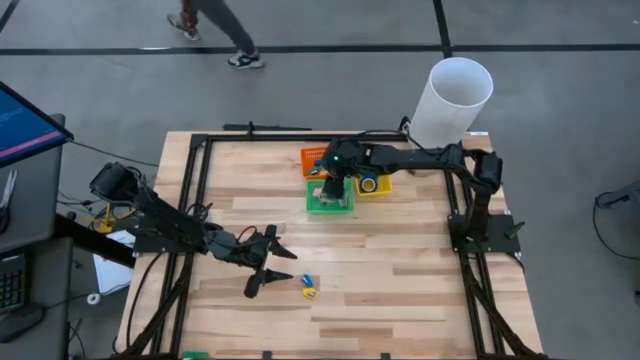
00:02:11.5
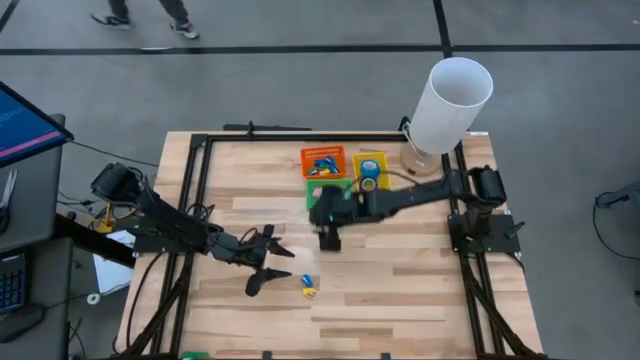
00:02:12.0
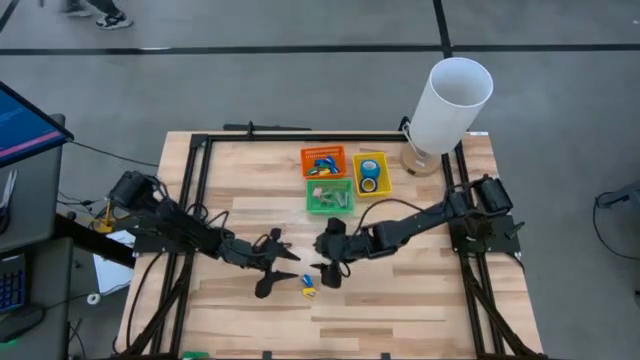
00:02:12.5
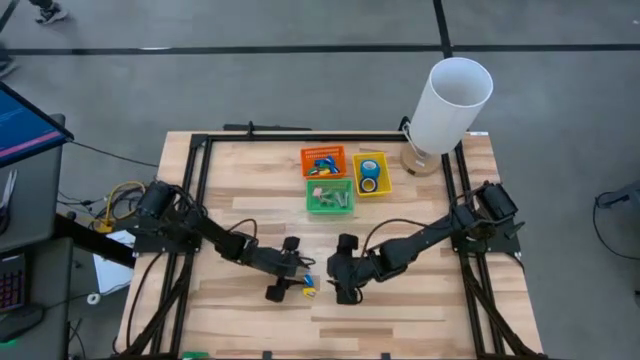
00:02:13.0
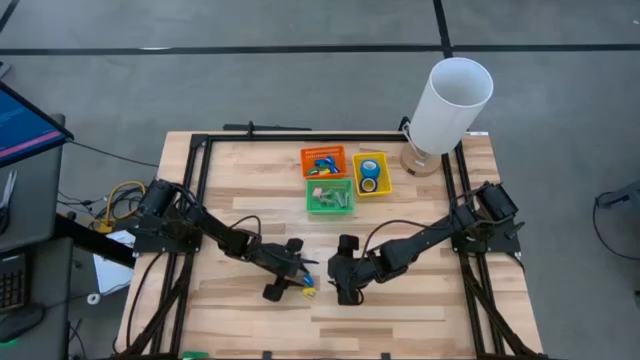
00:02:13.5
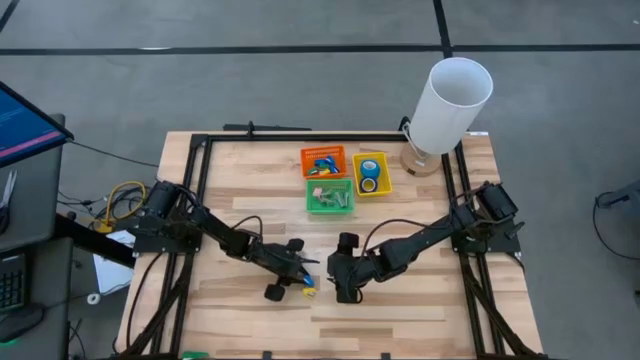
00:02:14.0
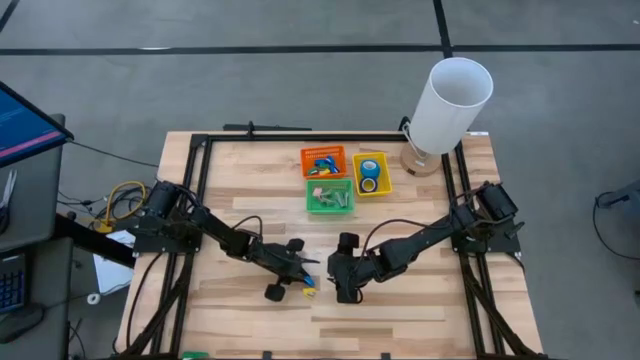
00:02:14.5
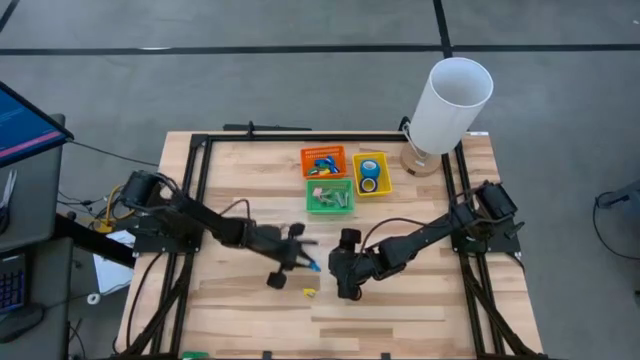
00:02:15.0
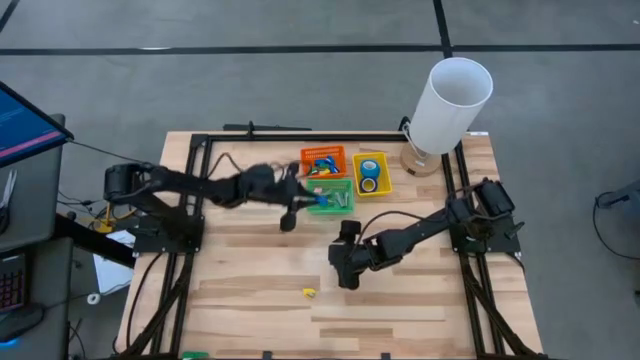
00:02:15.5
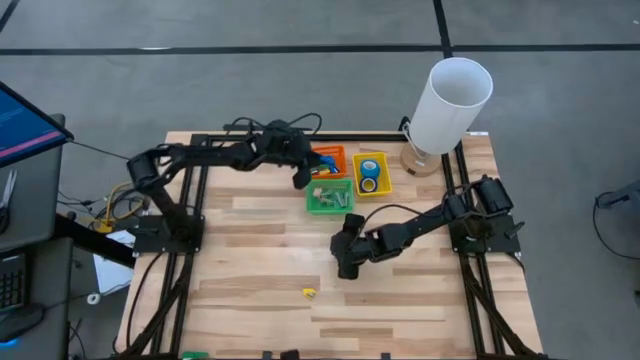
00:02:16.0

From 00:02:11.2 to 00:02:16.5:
Task: Pick and place Stapler, Stapler remover, tape
Put the blue stapler into the orange bin

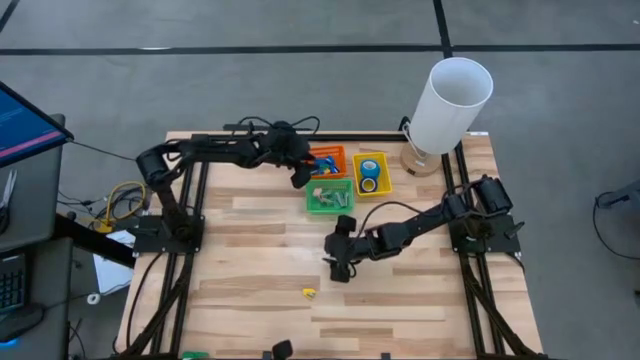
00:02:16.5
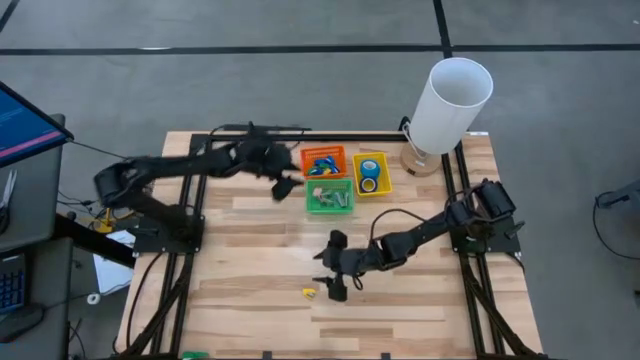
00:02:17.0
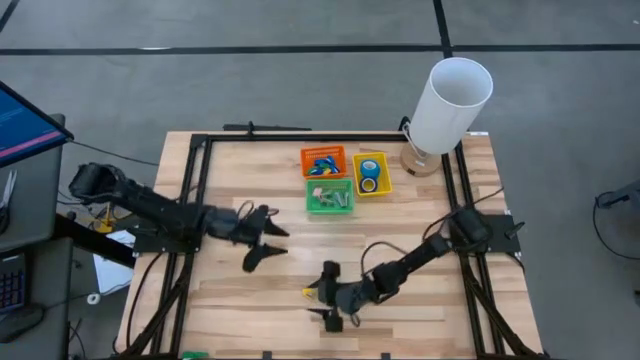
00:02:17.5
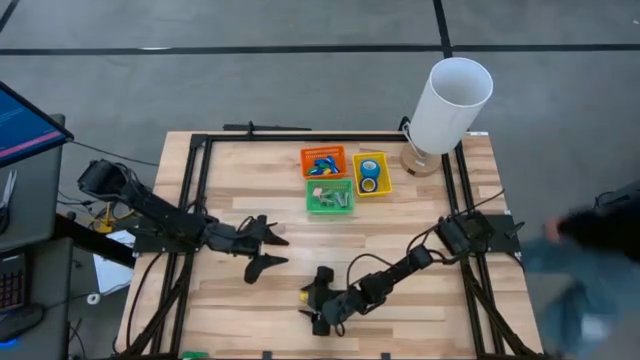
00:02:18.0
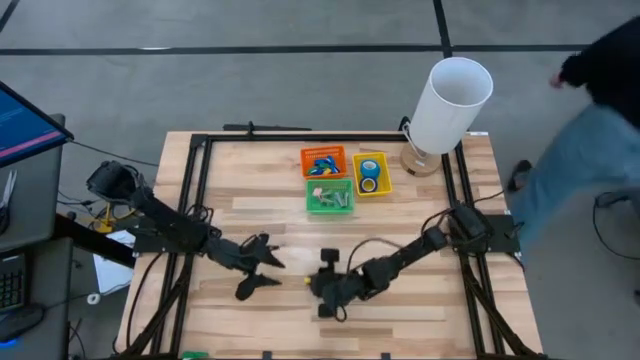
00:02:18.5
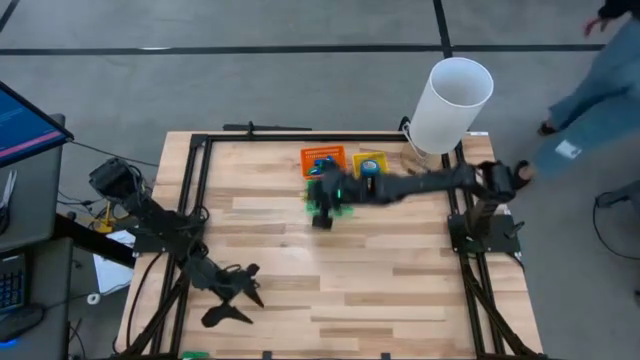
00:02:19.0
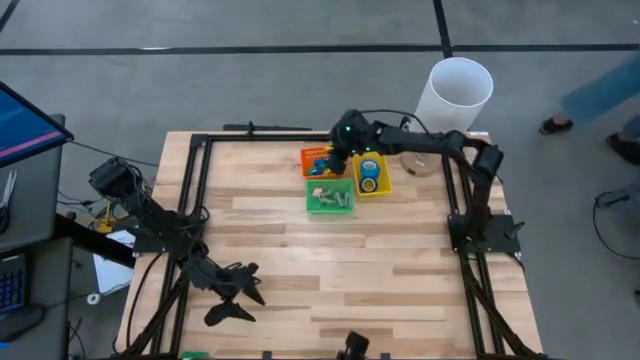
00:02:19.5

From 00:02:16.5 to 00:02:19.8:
Put the yellow stapler into the orange bin

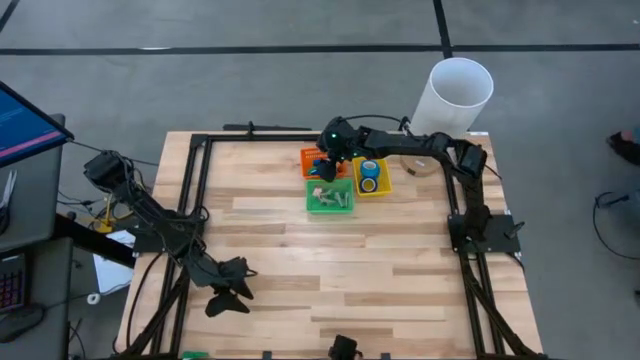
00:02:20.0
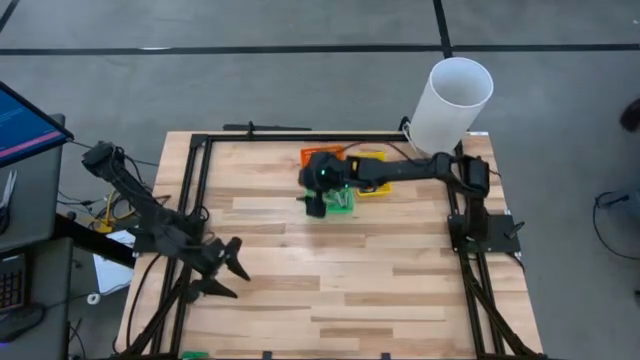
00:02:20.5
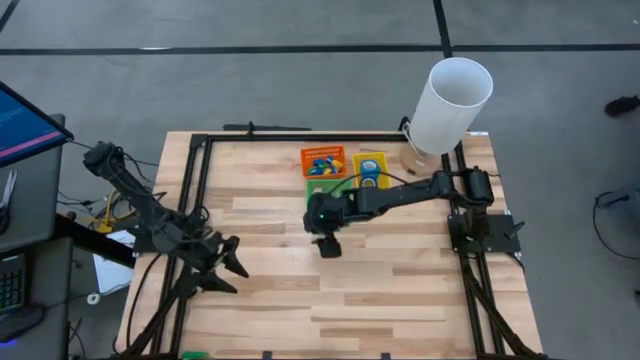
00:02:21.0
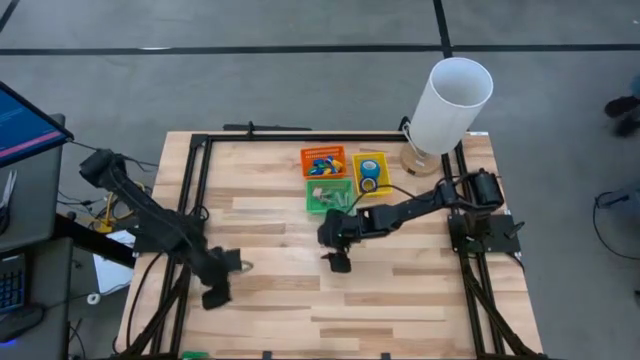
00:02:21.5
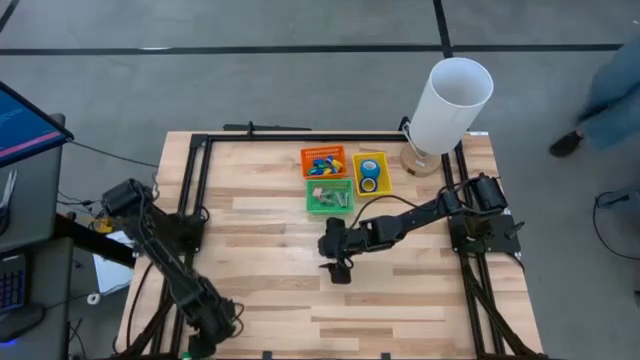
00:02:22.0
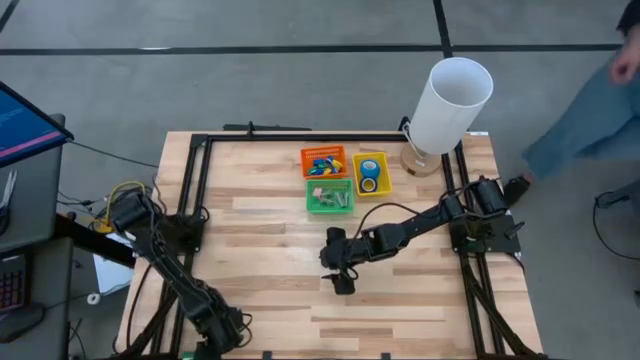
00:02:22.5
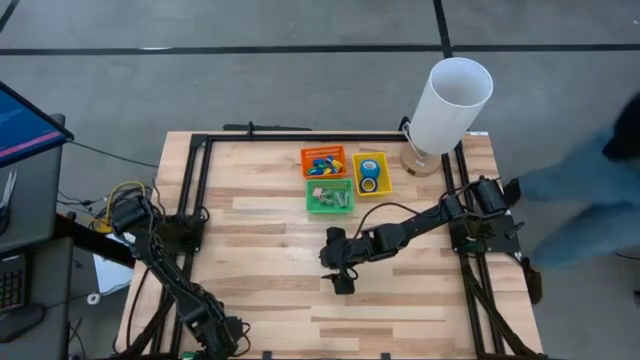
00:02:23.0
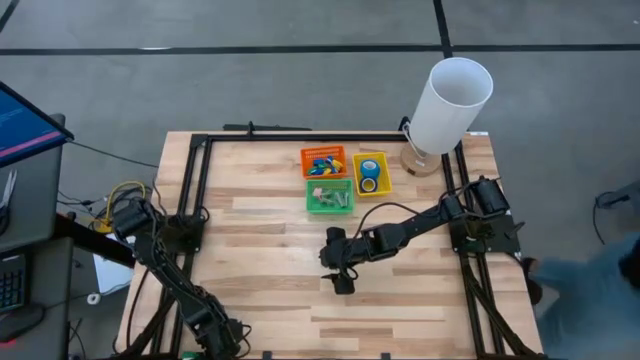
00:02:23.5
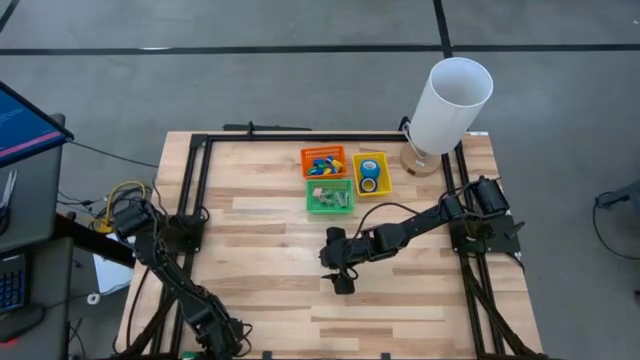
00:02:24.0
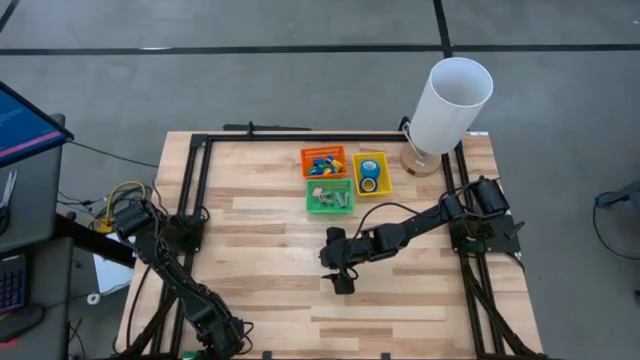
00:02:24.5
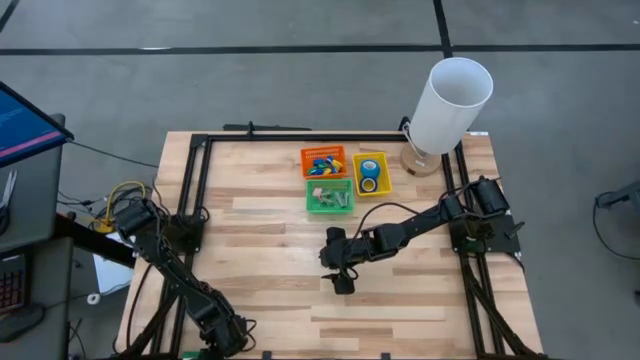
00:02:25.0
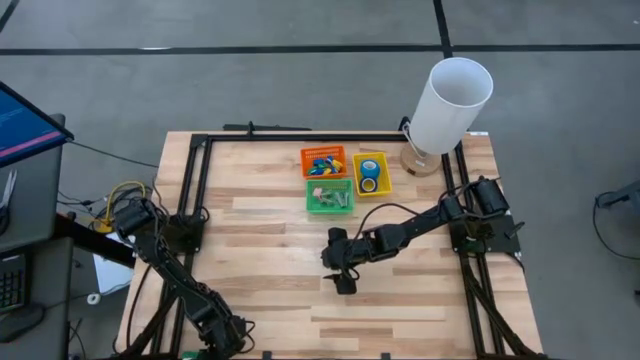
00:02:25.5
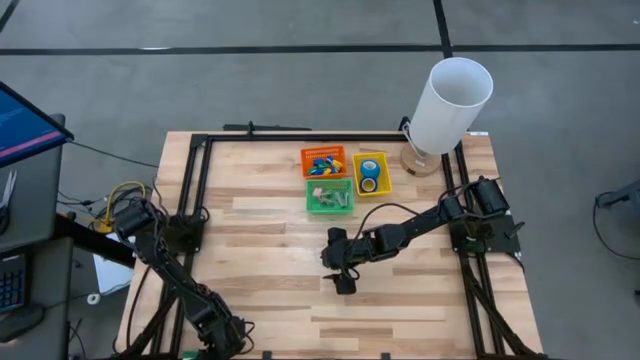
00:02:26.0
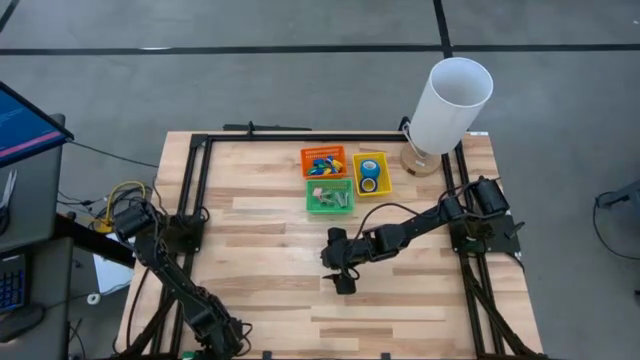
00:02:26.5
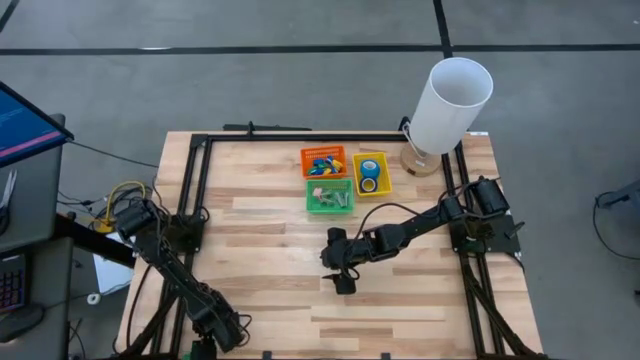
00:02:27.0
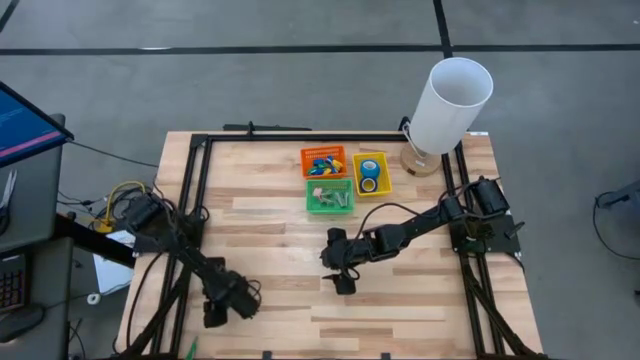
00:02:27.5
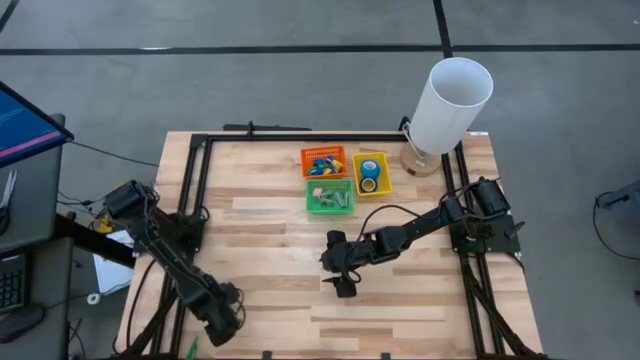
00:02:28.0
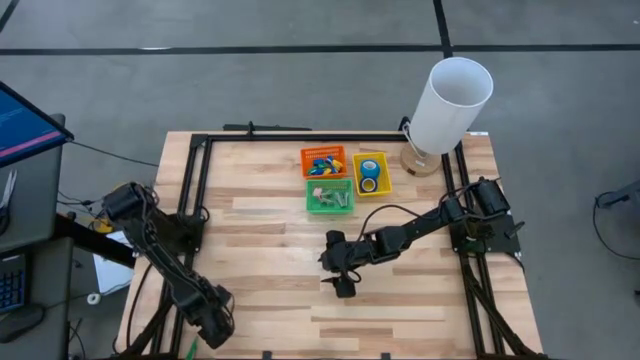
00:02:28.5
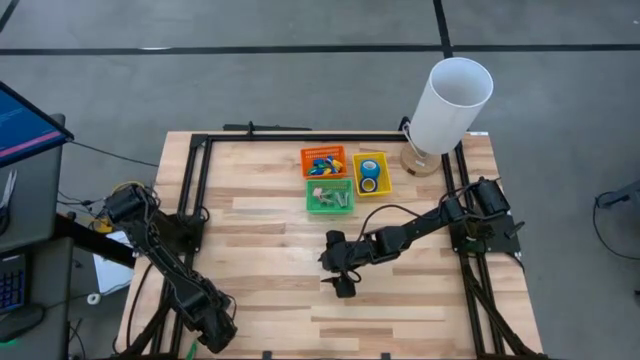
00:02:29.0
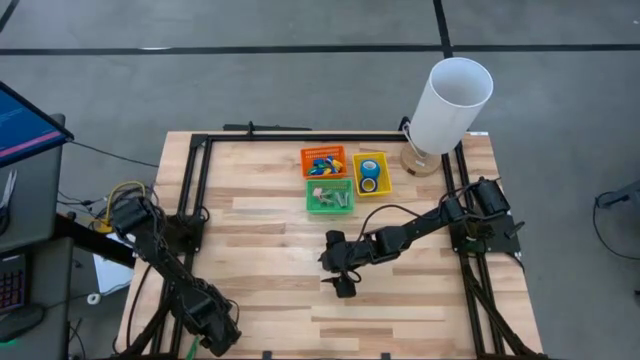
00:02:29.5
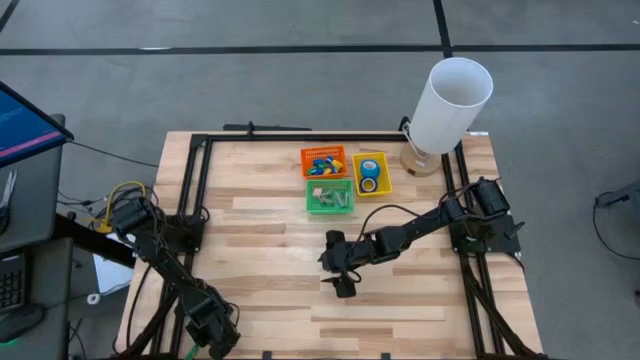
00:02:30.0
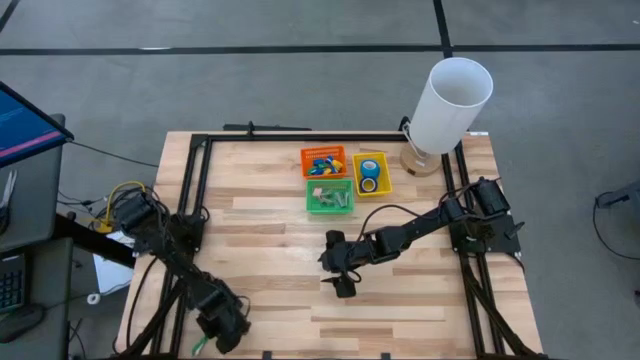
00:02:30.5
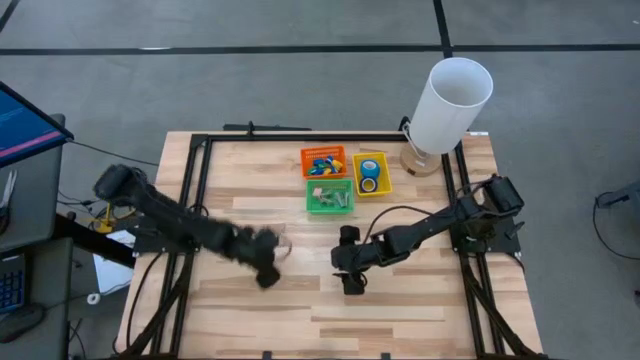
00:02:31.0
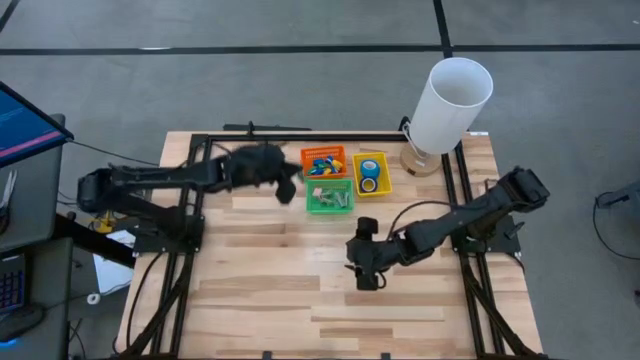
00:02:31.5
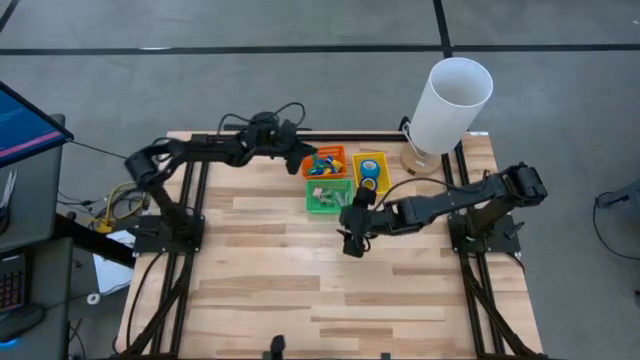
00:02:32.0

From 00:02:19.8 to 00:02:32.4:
Put the green stapler into the orange bin
